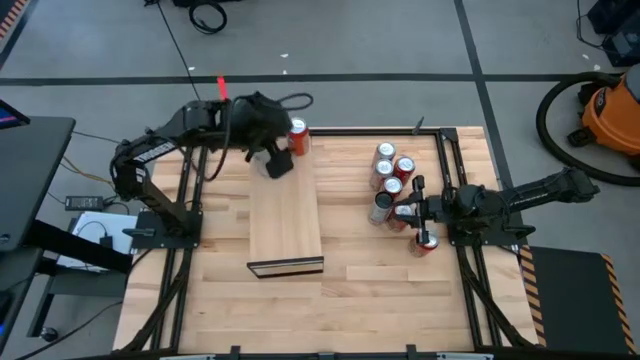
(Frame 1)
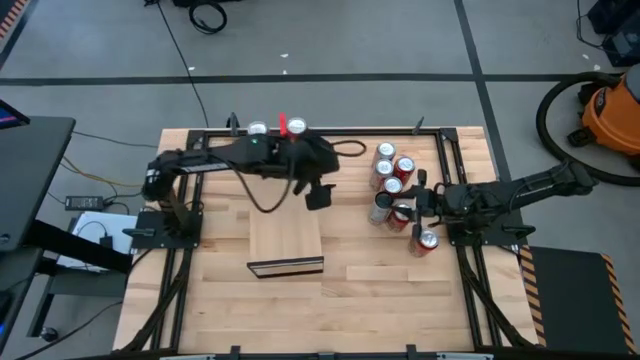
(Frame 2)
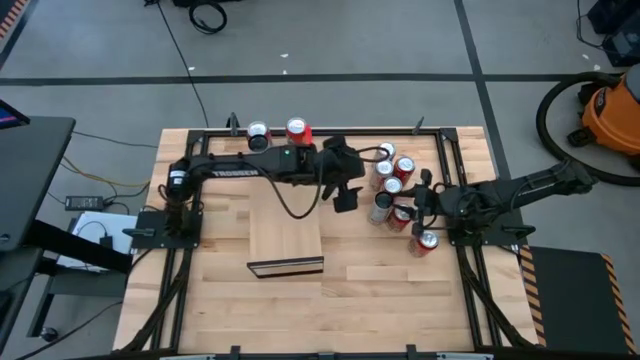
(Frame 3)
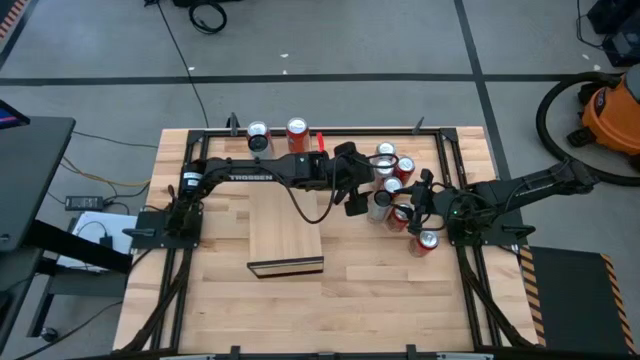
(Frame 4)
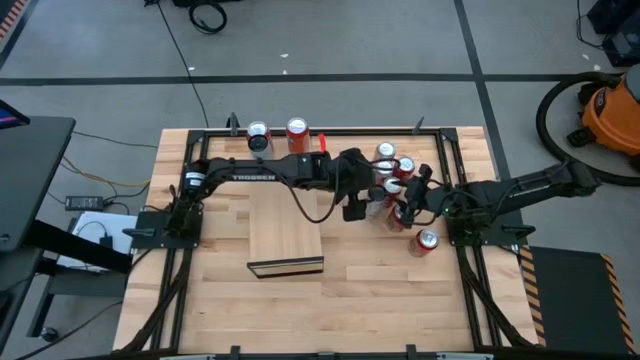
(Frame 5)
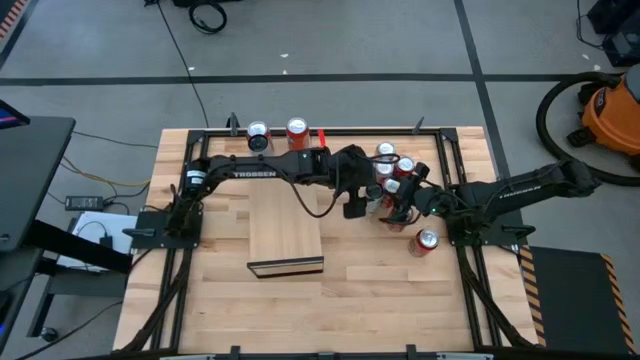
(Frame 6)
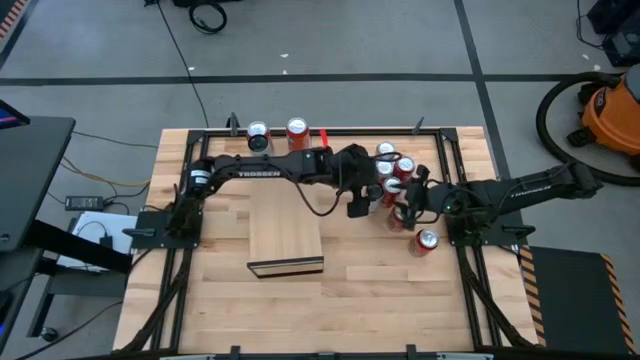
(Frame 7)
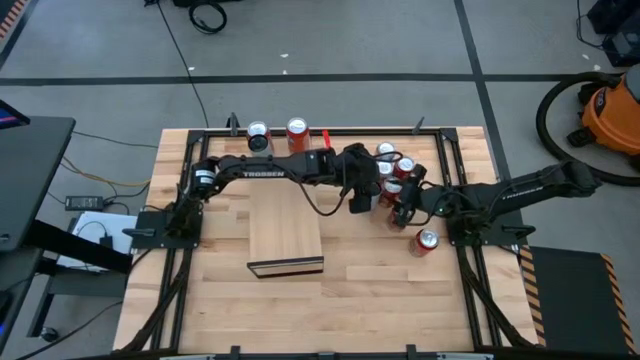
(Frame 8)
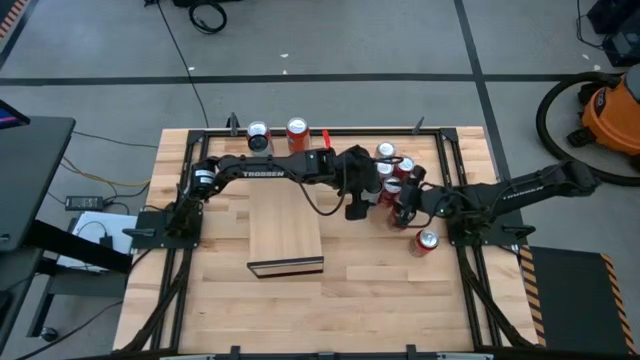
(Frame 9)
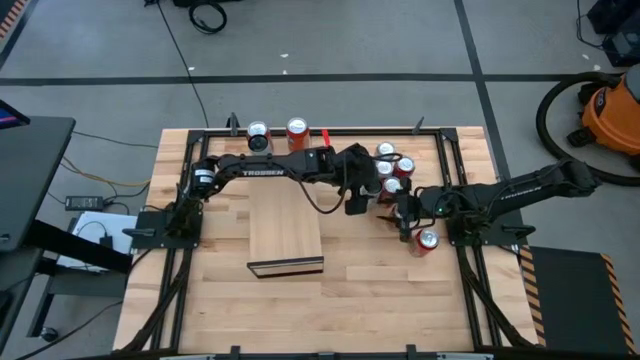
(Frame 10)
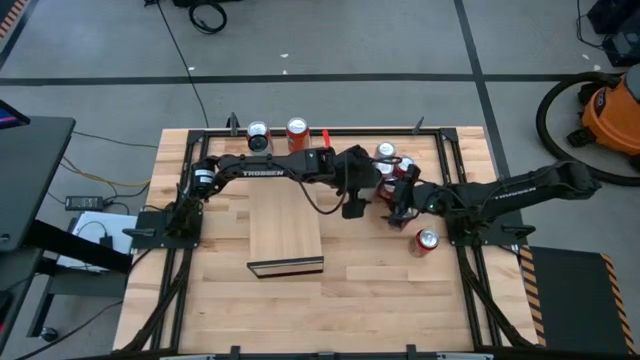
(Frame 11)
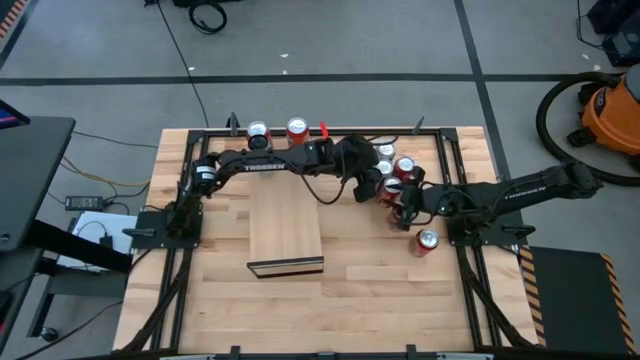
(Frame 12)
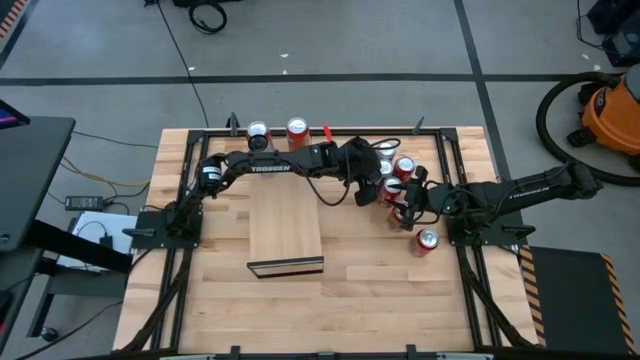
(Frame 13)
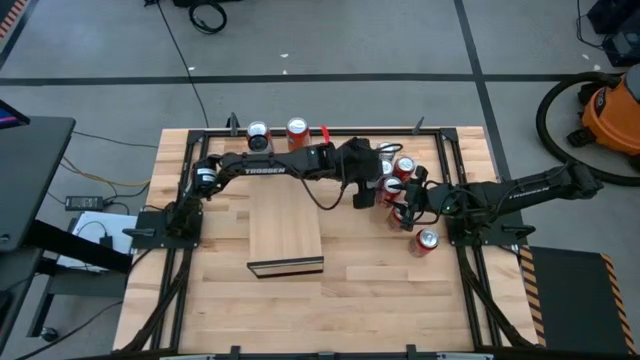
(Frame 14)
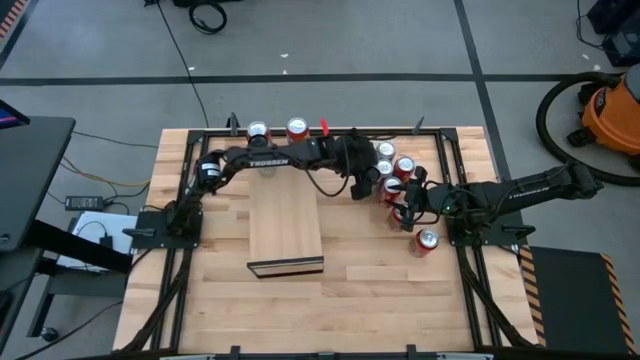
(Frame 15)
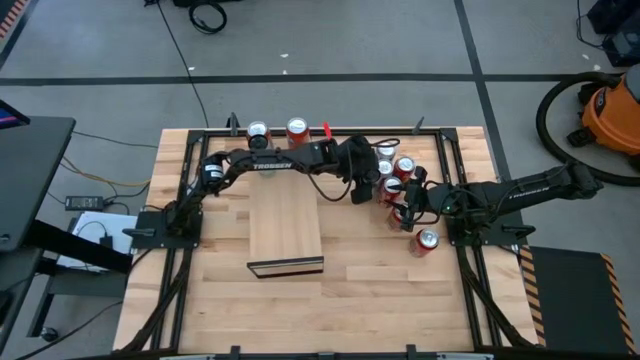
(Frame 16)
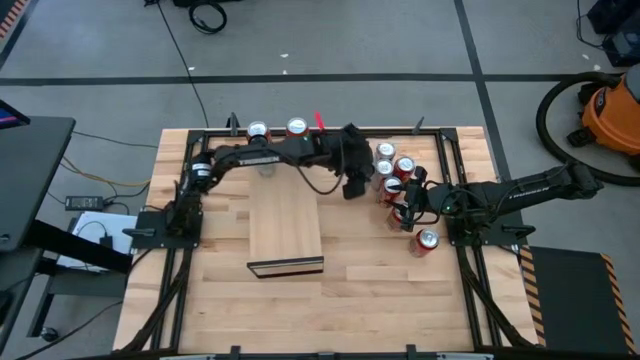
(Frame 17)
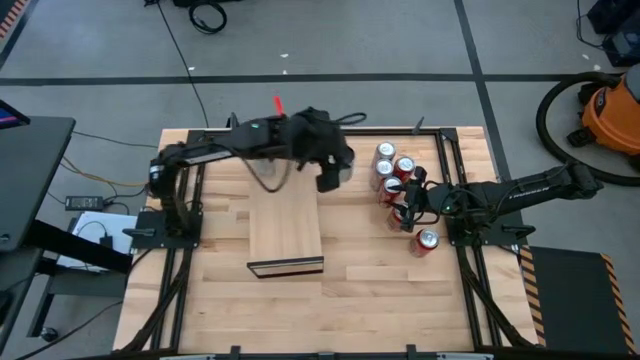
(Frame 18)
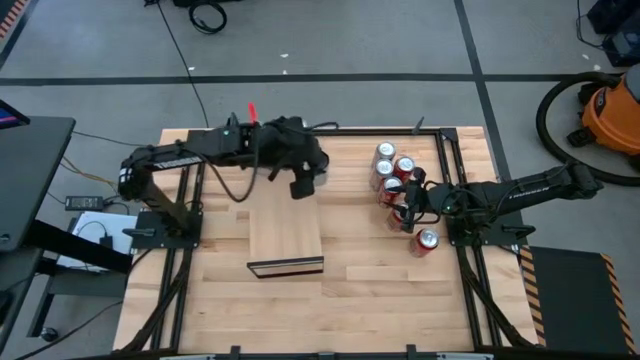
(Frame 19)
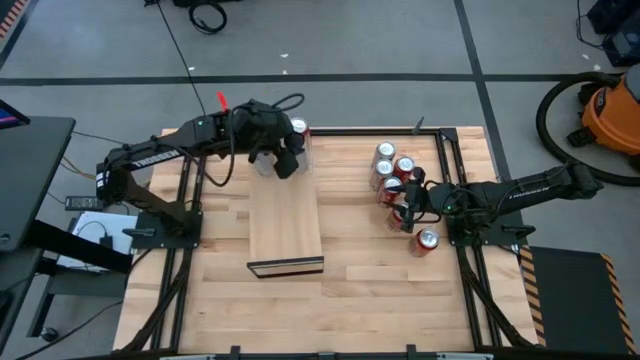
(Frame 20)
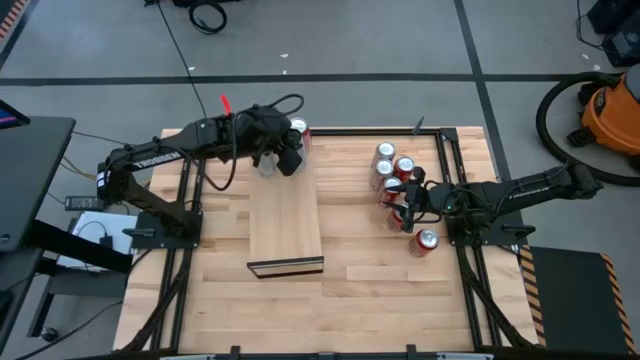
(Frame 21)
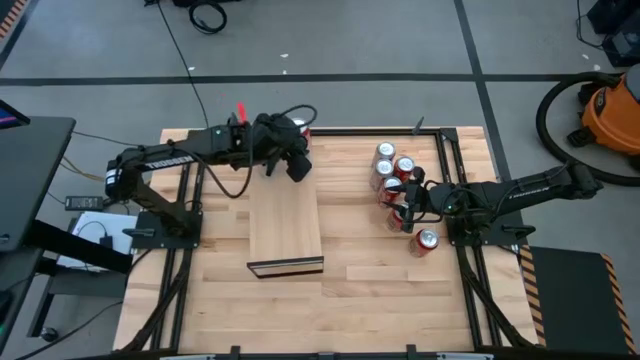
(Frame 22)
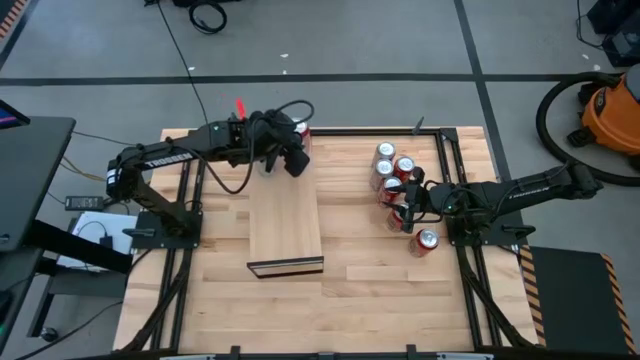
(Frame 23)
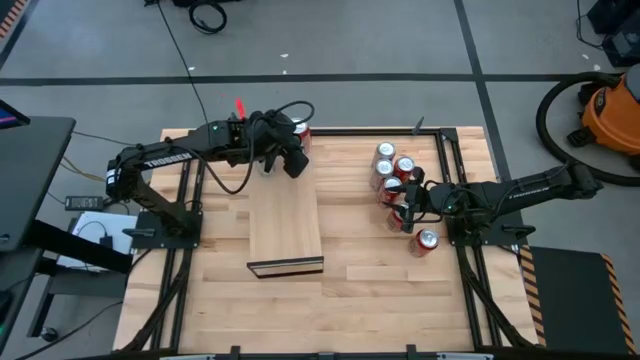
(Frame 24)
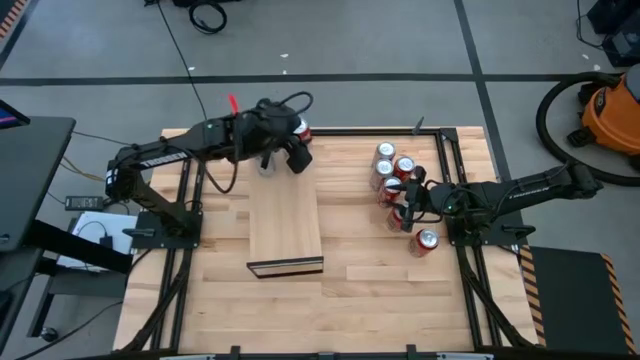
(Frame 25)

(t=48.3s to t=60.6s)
Task: Place canned beverage on shelf
Align the white and black soda can with the other white and black soda can on the shelf

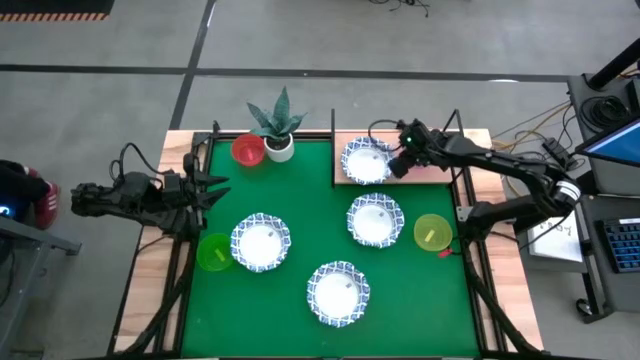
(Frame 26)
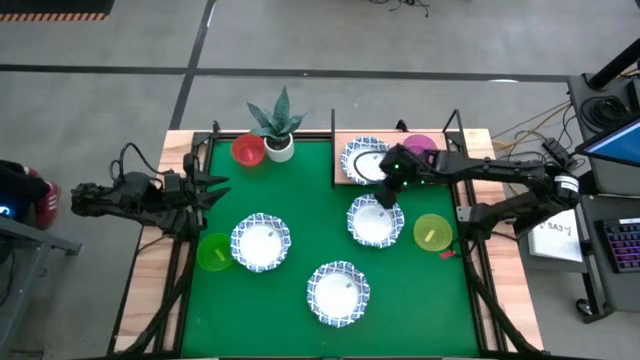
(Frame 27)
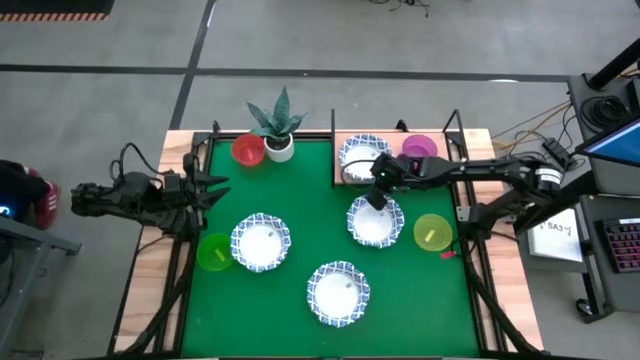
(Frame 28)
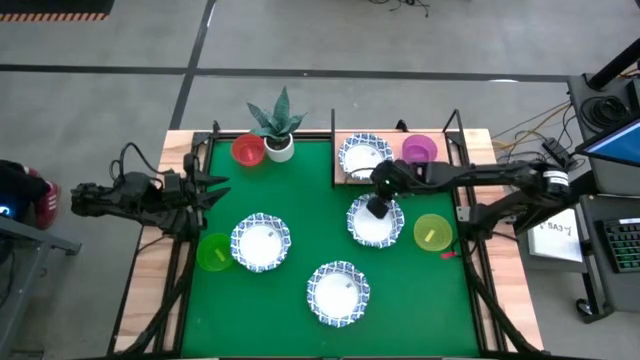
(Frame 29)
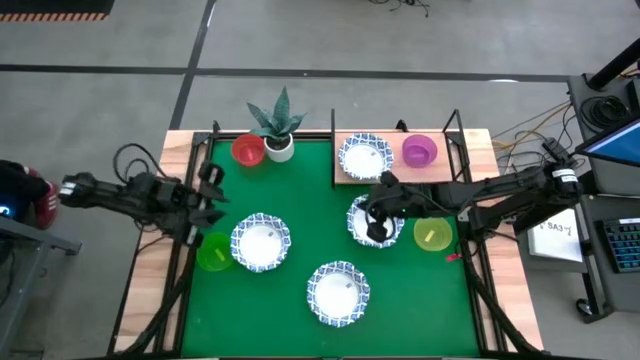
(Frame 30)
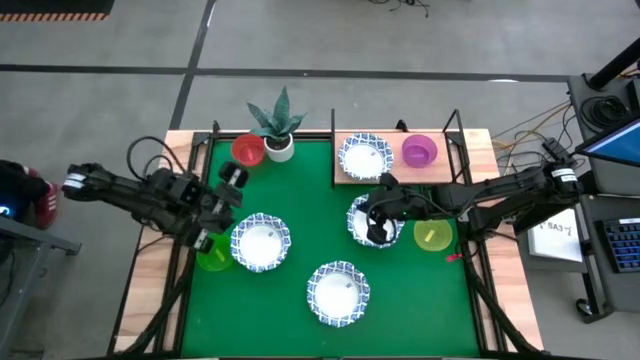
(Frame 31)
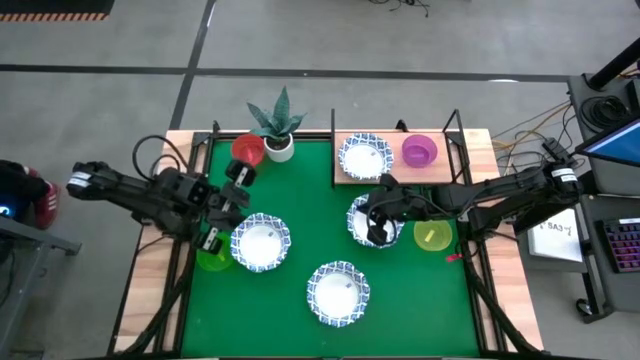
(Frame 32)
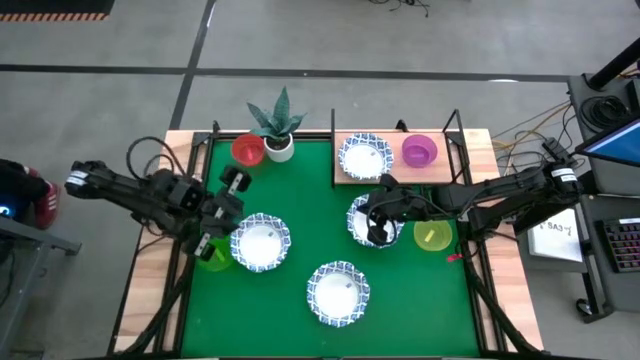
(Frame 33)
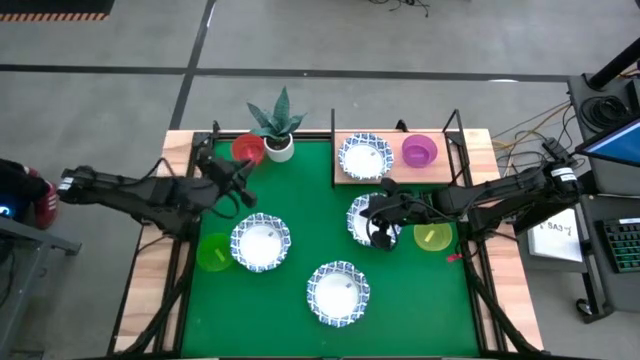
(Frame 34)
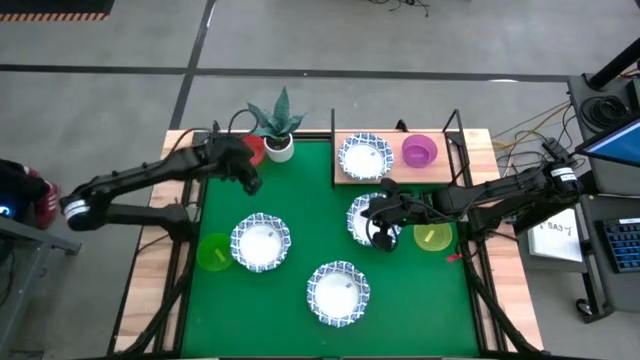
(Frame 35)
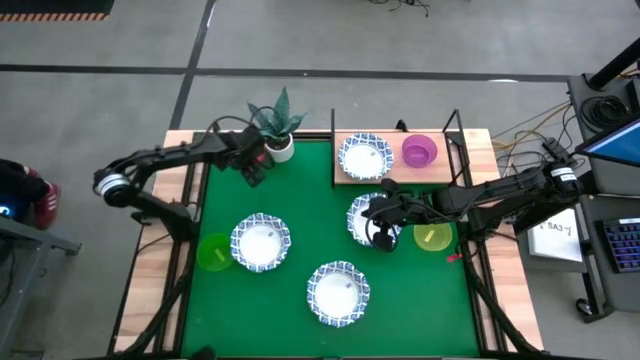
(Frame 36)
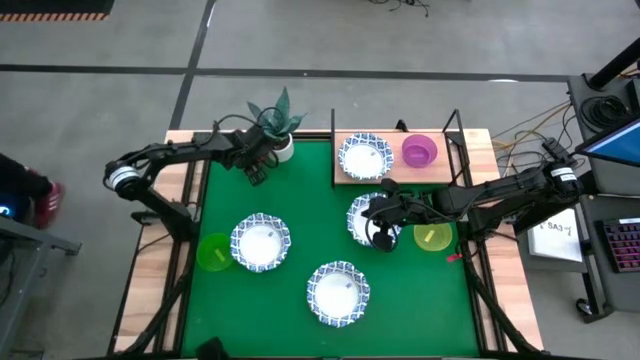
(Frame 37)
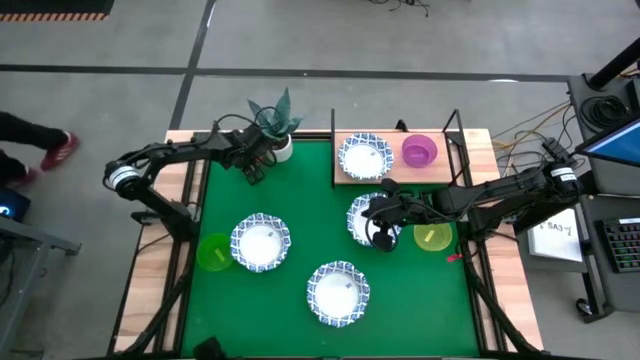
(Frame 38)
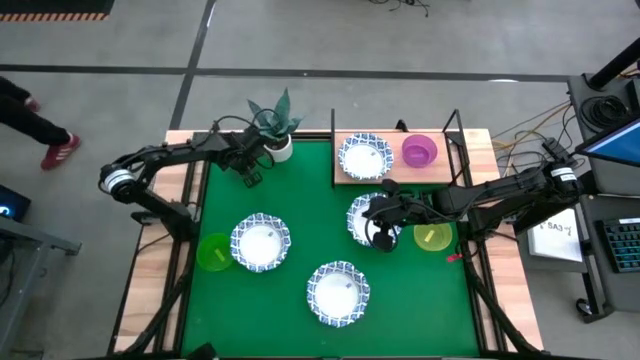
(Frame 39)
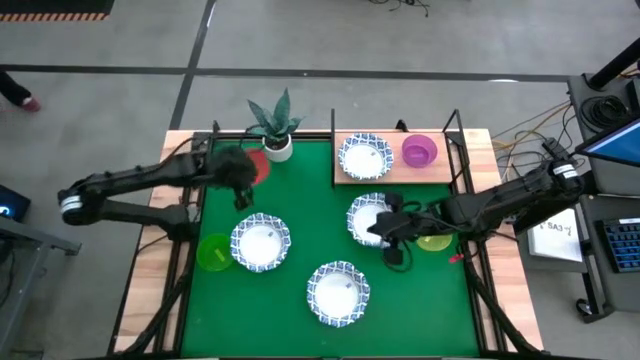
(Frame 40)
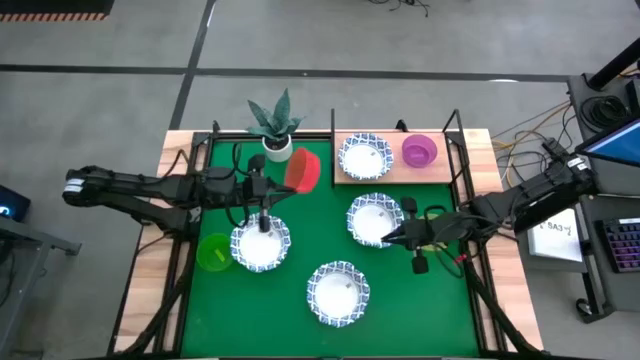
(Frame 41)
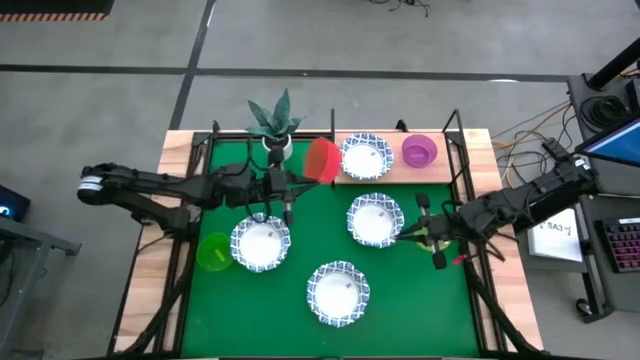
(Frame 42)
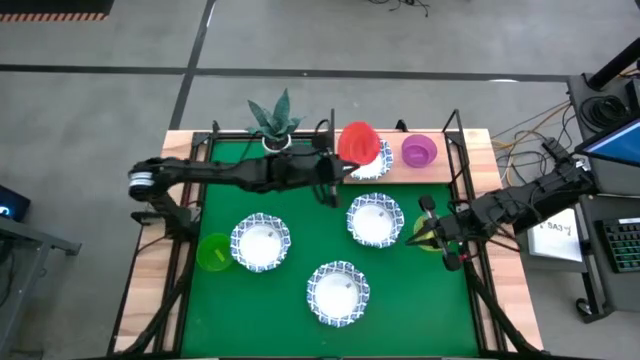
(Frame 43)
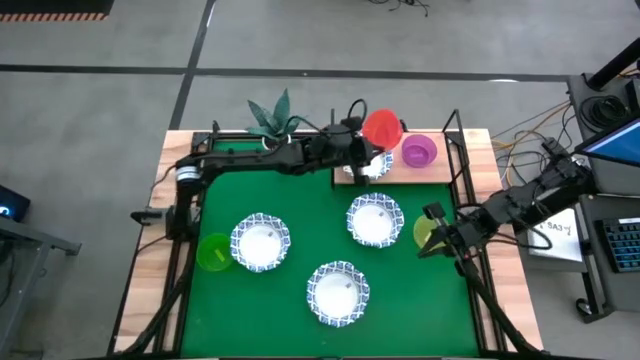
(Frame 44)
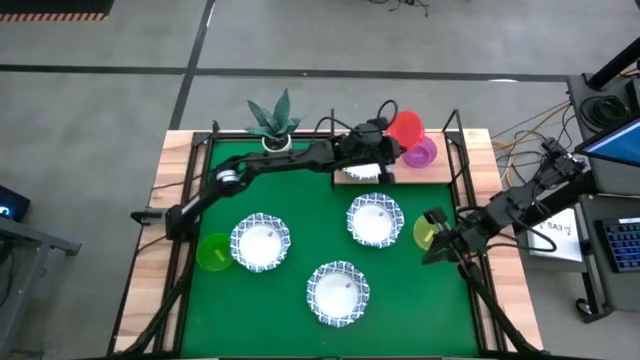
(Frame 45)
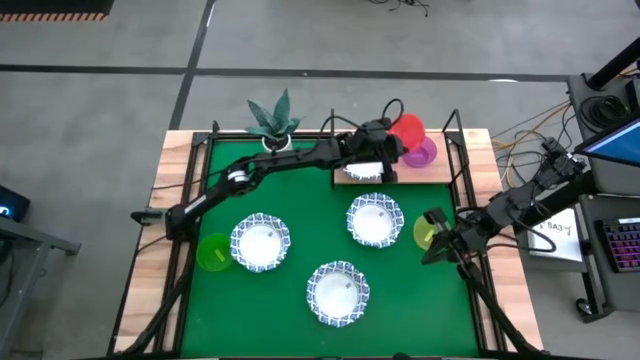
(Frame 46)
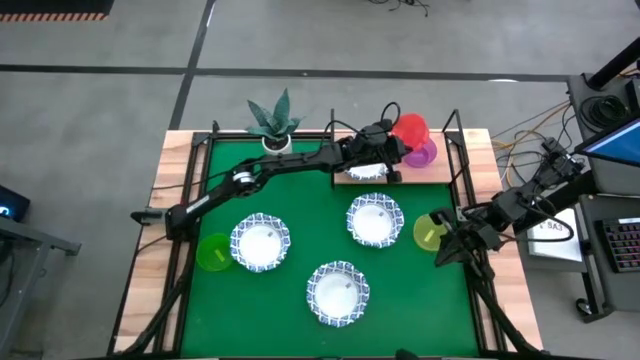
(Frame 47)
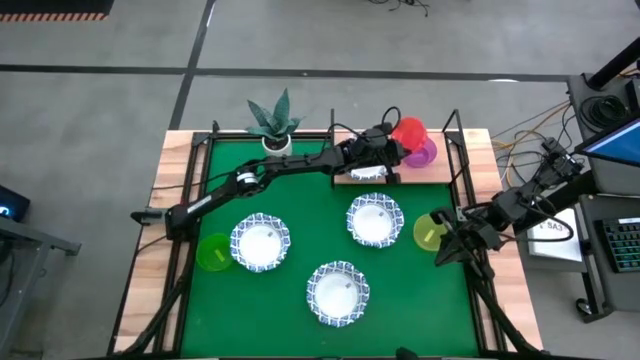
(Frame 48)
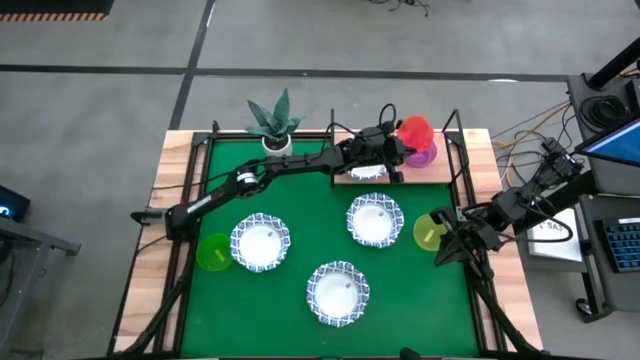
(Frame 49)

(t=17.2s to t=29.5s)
Task: Place and stack bowls onto a shelf
Stack the orange bowl on top of the purple bowl on the shelf
